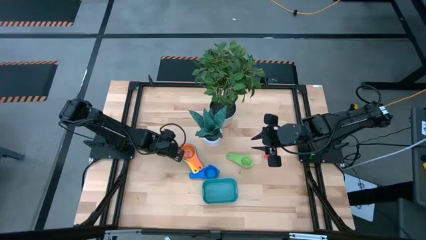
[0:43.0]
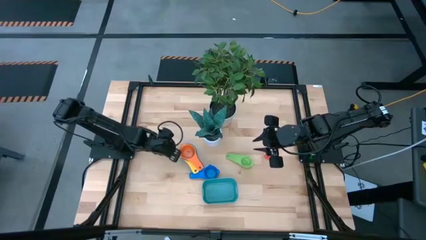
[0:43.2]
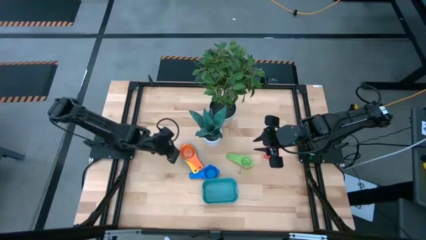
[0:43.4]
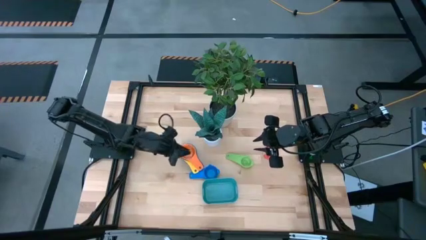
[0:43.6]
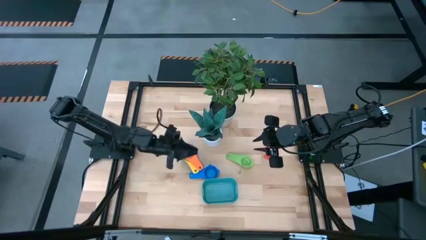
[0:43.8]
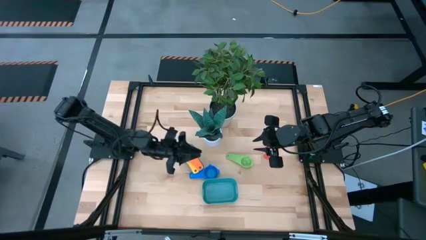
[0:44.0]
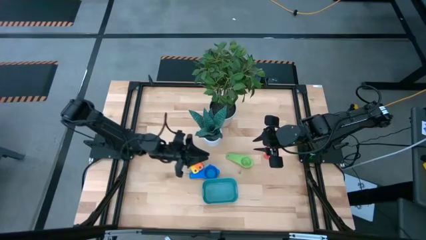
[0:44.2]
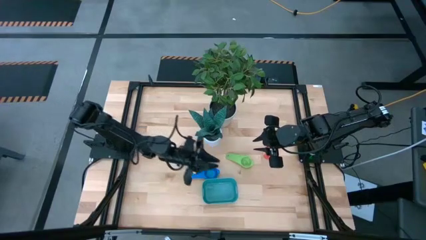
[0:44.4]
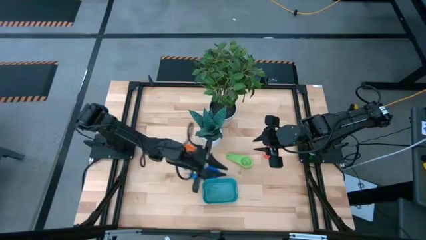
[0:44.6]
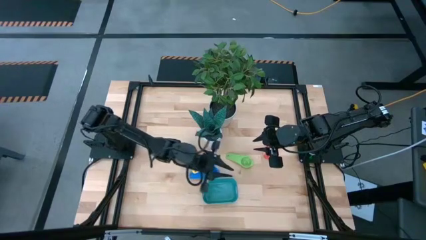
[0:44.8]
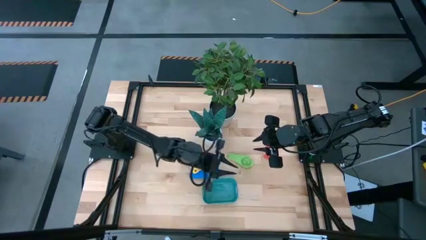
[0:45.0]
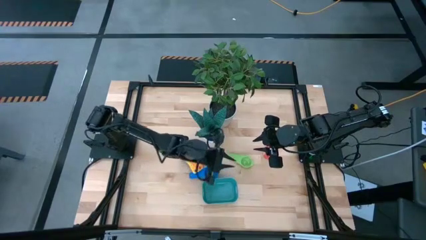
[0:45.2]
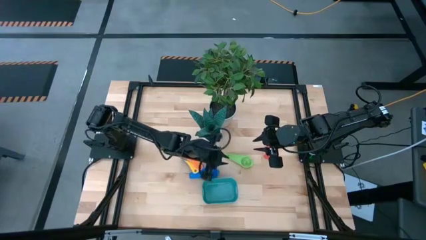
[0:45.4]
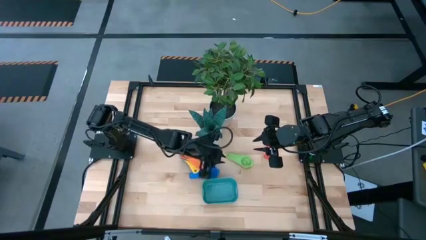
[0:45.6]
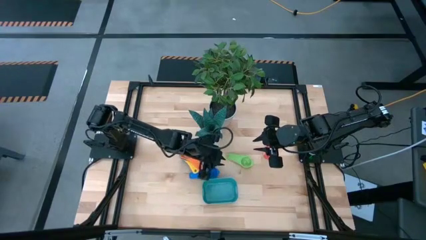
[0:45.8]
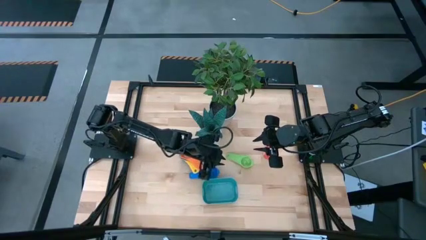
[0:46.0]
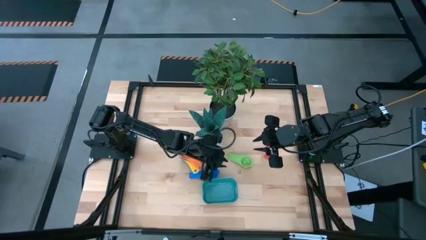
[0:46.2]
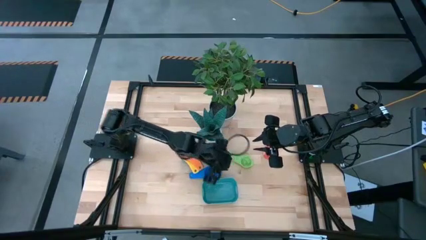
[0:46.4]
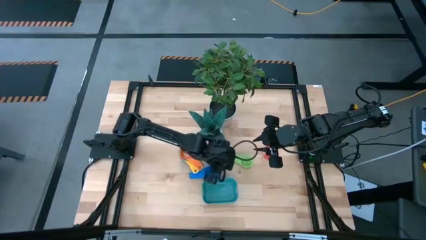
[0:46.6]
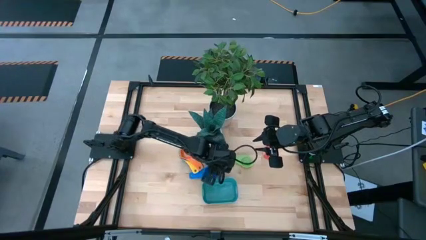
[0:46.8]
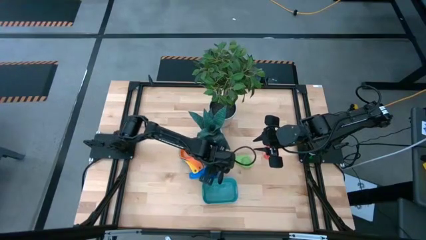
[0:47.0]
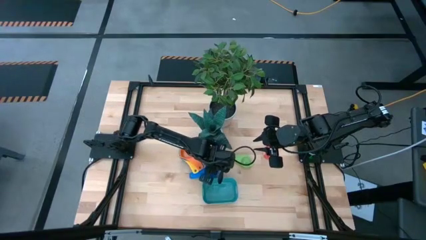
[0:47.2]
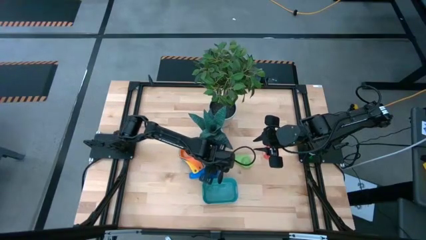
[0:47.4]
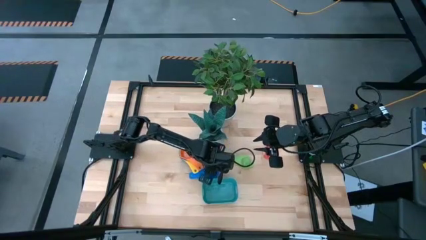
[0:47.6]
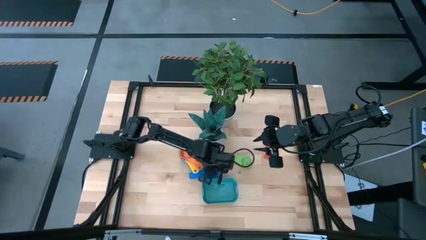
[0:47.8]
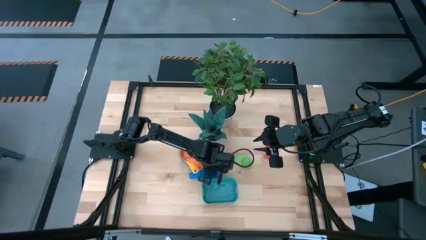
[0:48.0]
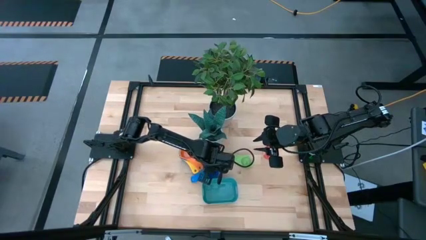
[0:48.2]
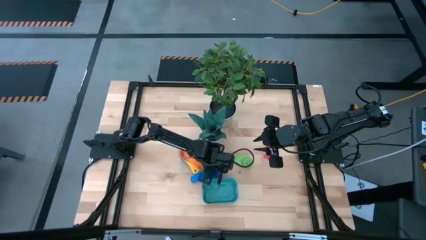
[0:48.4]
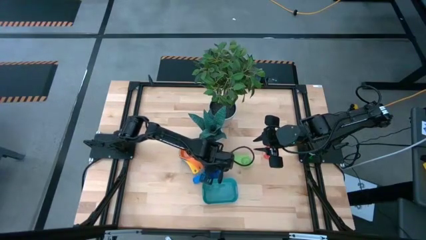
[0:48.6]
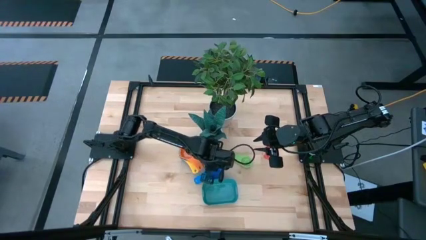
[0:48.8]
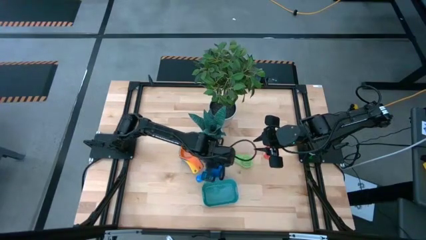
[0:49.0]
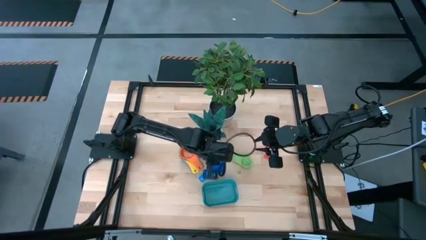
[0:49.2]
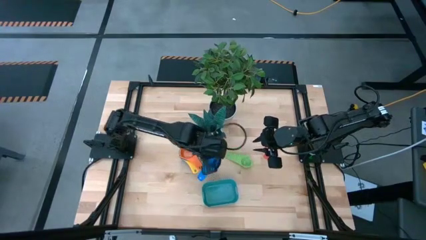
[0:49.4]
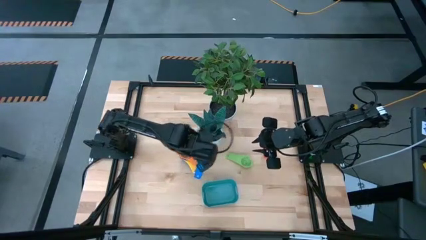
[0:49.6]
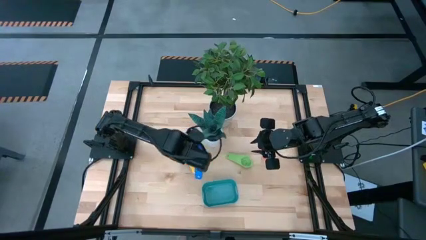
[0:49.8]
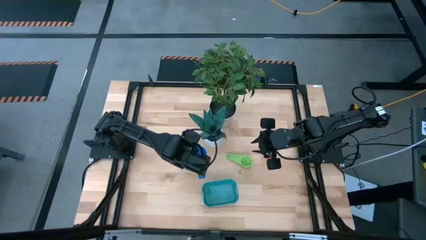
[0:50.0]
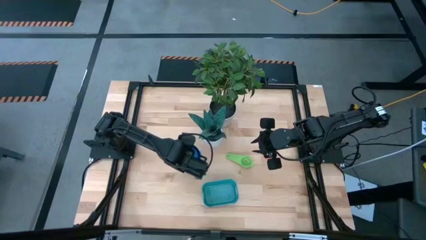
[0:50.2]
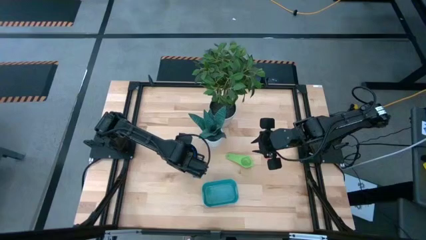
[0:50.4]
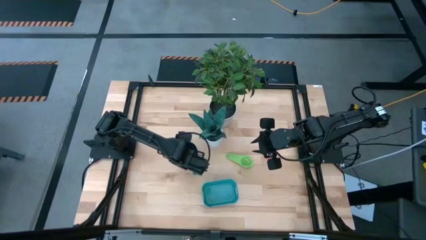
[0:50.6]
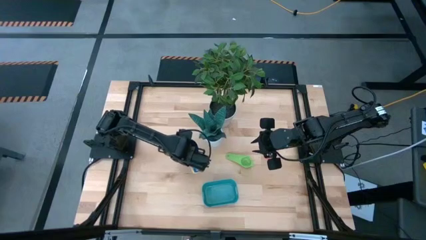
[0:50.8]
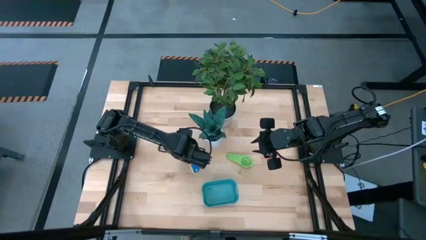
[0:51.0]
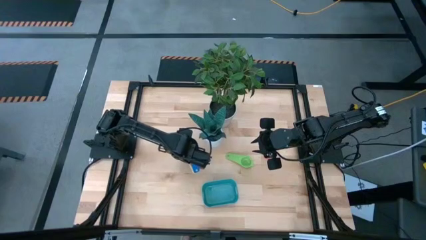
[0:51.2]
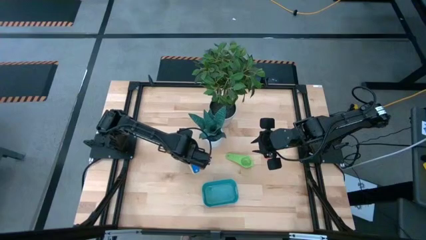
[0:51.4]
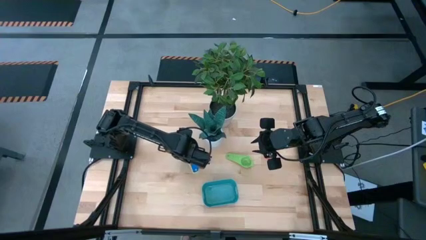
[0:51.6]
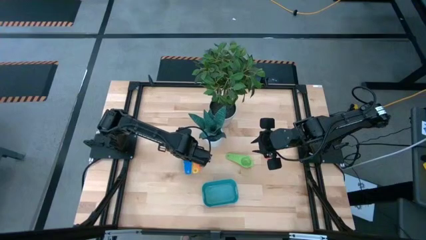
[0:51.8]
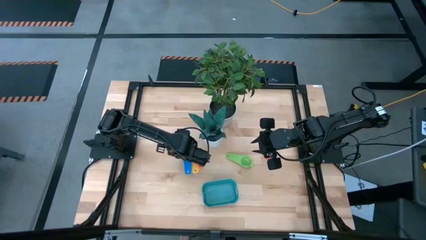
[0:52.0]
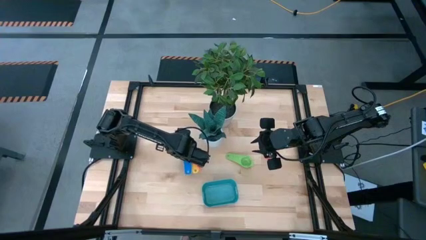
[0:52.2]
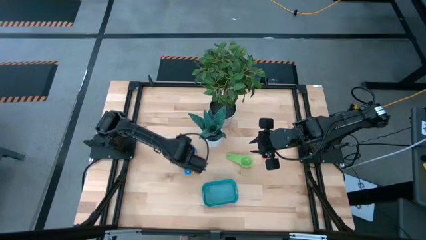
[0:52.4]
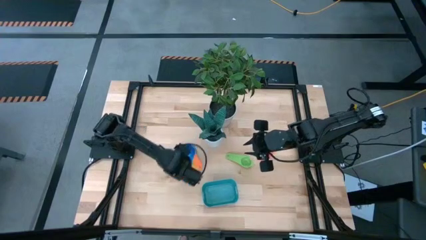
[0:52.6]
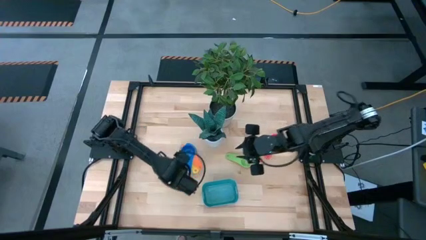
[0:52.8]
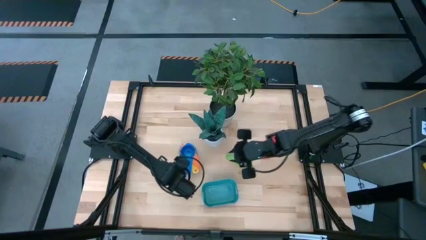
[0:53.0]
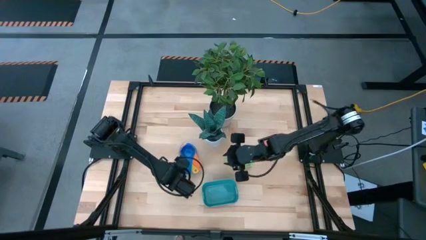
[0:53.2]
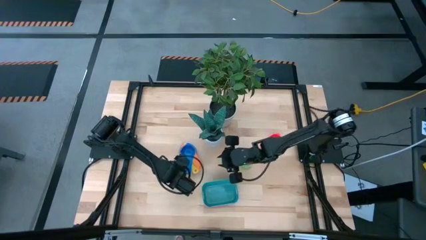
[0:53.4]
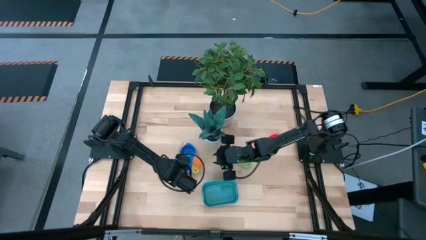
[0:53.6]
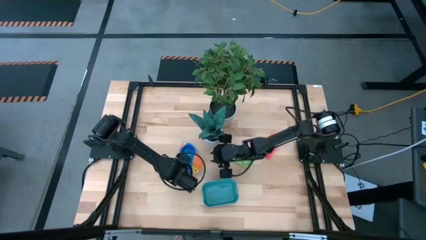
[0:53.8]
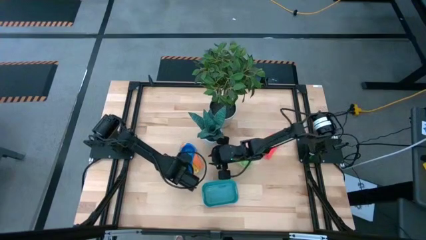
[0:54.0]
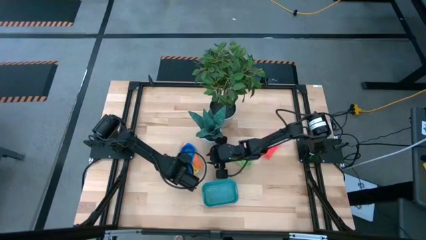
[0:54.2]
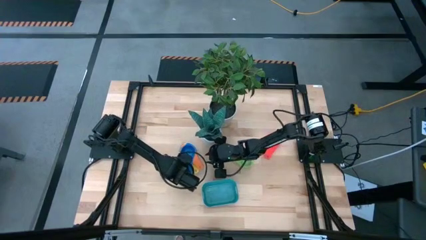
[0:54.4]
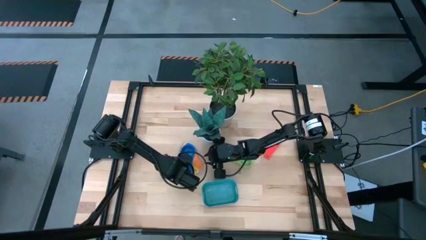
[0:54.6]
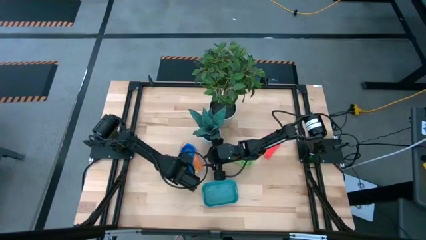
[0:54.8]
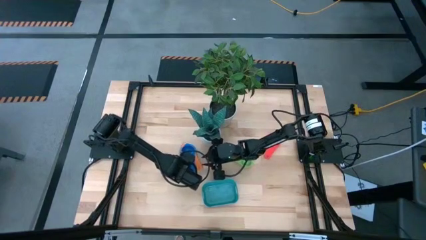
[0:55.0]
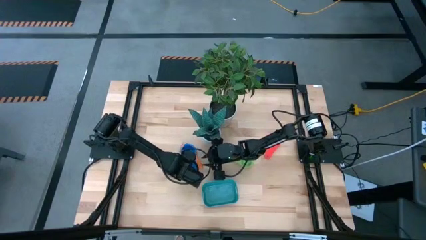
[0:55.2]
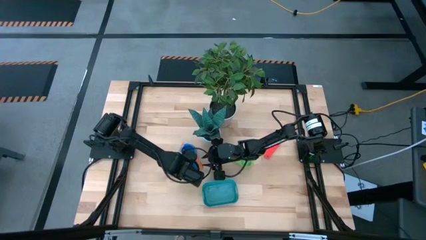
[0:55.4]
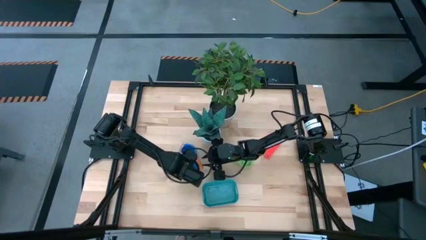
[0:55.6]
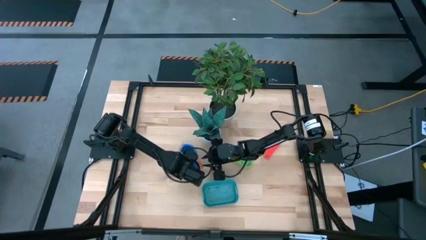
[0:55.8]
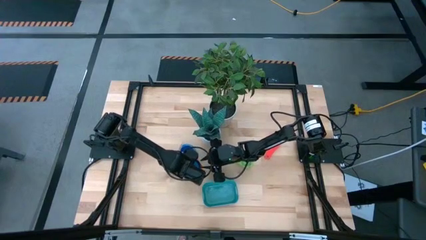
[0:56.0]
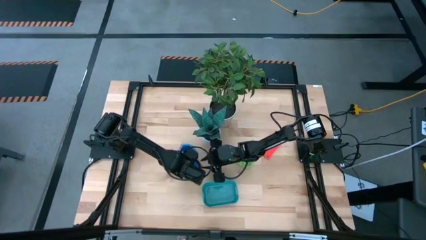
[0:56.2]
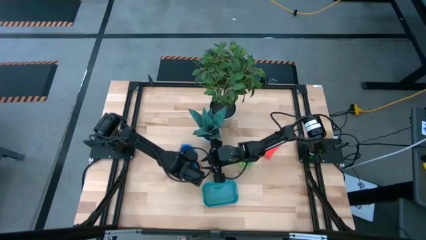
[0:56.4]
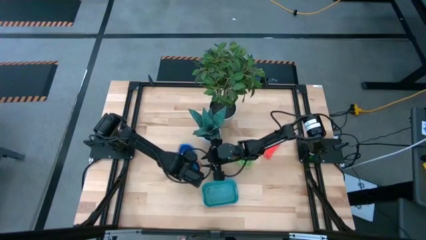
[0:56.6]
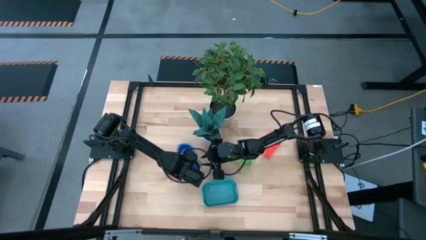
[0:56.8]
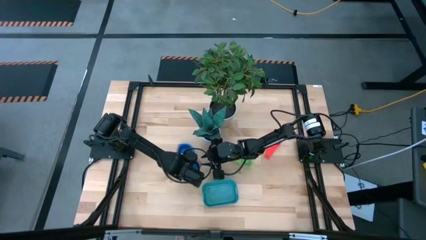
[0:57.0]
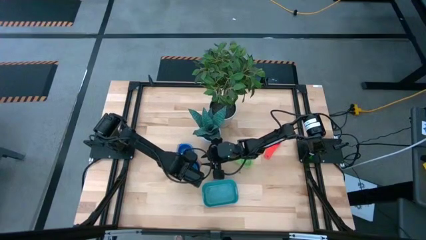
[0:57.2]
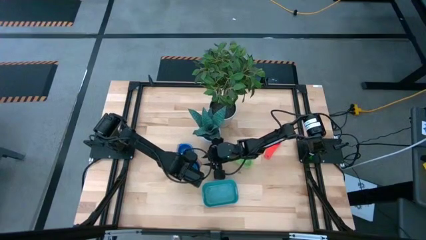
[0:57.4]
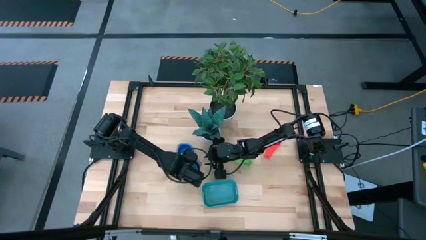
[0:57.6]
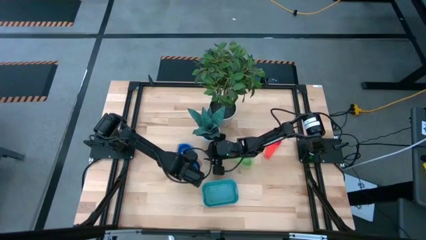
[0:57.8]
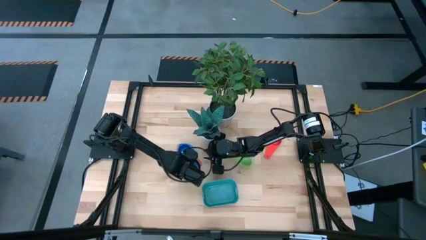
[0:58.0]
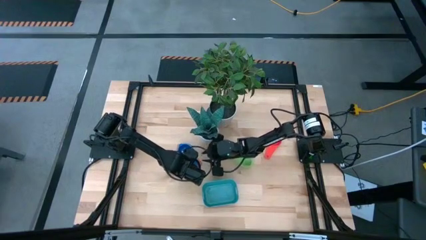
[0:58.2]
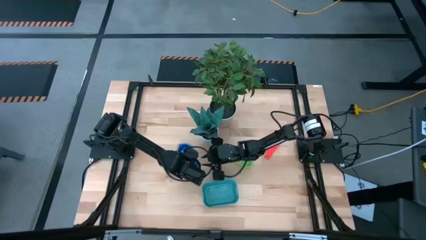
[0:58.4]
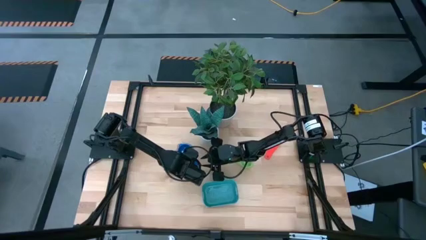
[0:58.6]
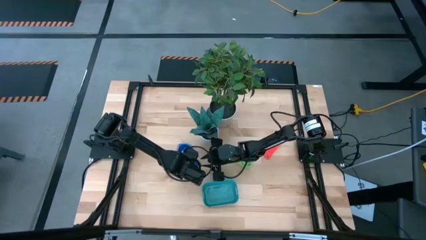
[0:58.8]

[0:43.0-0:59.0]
Task: Nest measuring cups in basket
Stack the blue measuring cup on top of the orange measuring cup
